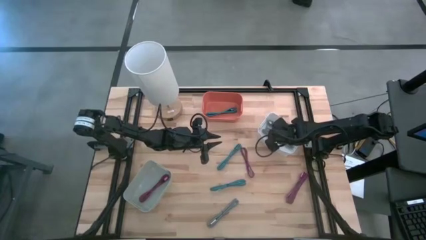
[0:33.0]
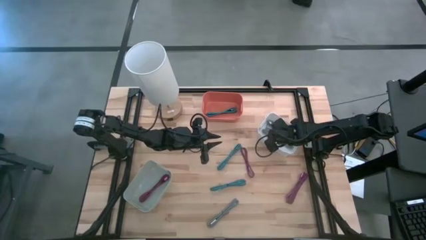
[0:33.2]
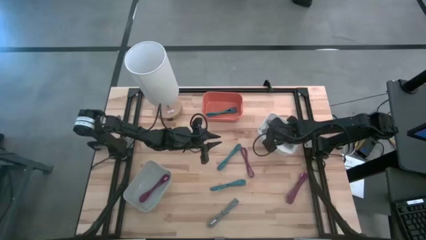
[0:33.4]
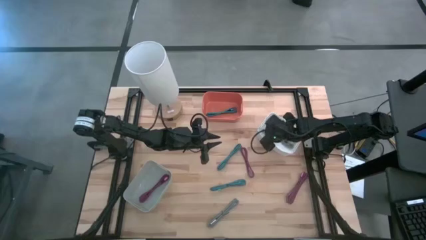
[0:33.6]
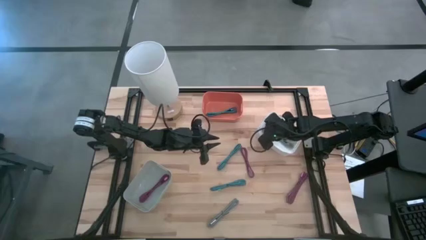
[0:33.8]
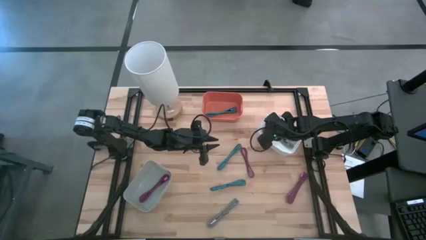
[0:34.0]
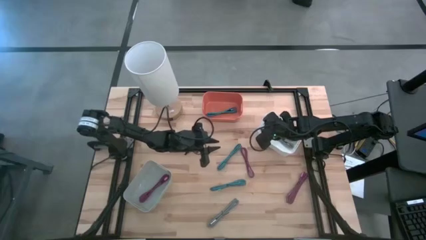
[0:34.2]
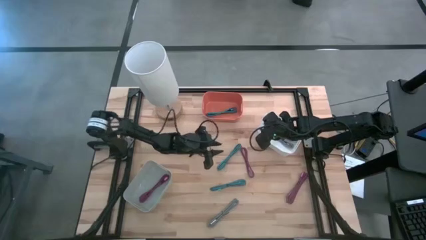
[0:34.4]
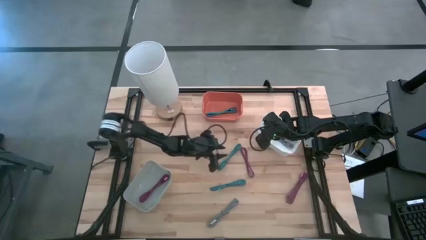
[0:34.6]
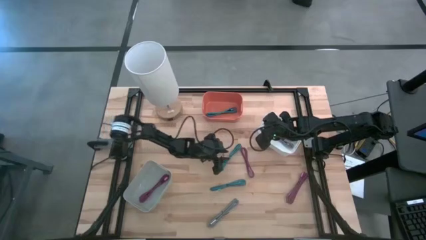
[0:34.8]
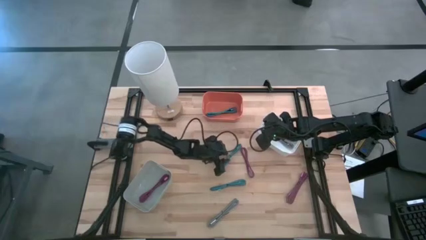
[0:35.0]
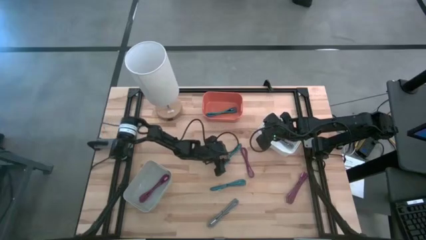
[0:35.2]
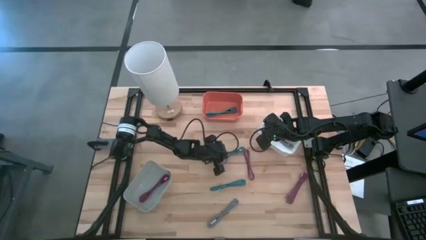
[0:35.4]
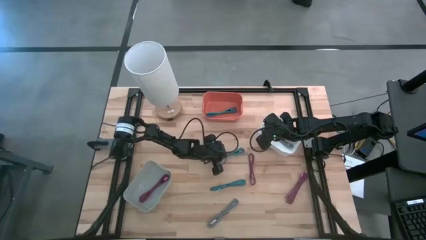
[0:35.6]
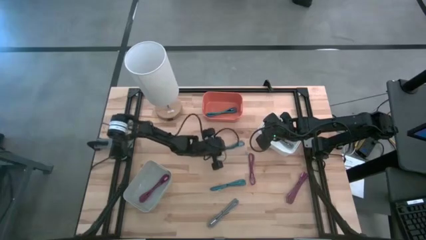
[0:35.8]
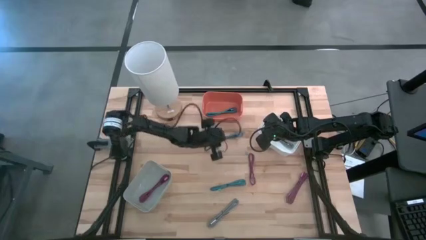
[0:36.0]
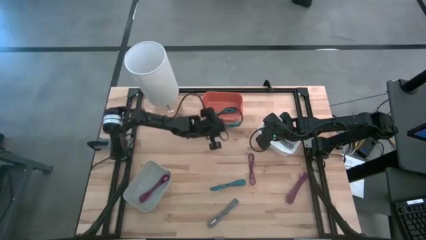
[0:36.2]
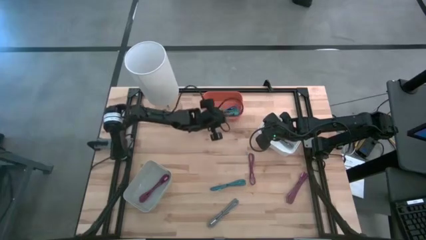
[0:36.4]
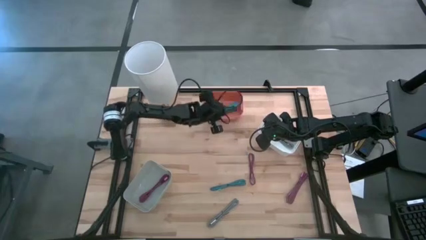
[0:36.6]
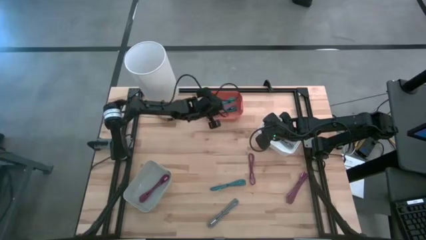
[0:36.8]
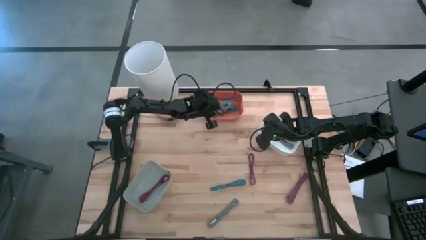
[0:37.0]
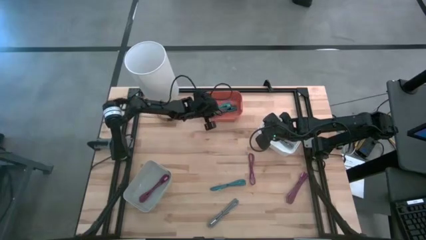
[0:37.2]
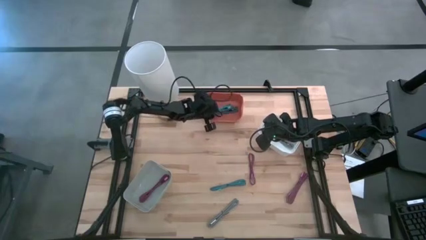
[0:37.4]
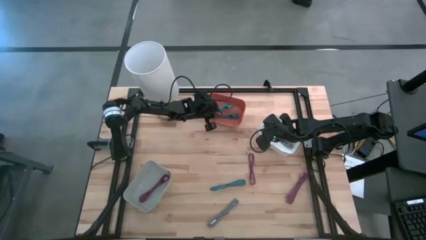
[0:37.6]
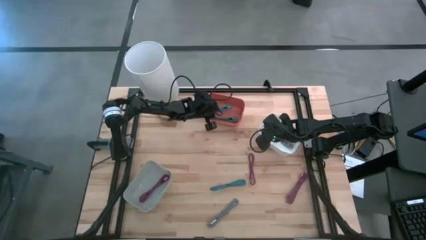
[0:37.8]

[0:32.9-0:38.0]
Task: Pick & Place USB Port
Put the top blue and white charger cable into the orange bin

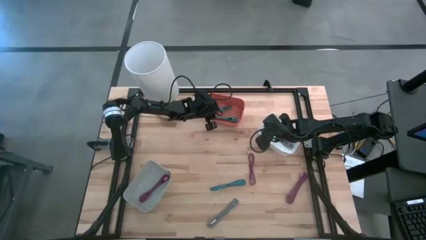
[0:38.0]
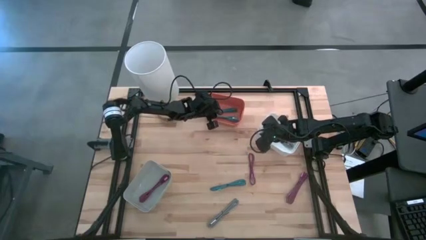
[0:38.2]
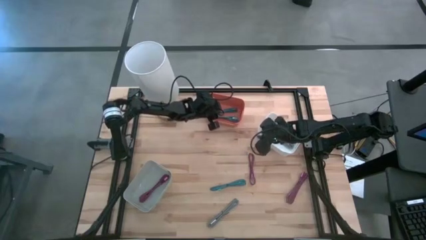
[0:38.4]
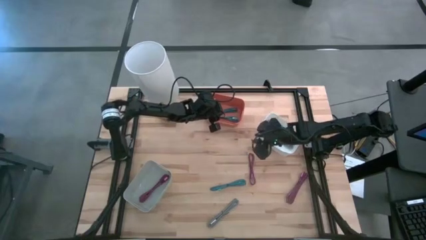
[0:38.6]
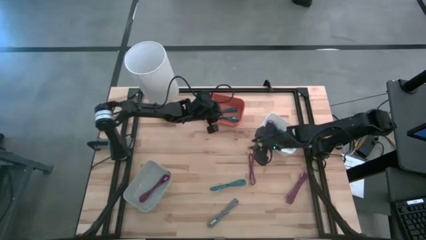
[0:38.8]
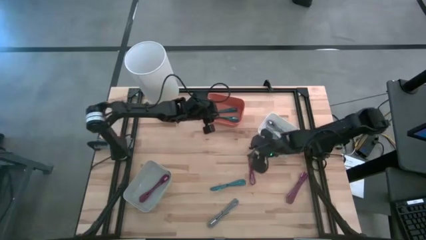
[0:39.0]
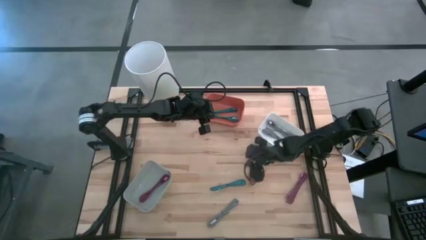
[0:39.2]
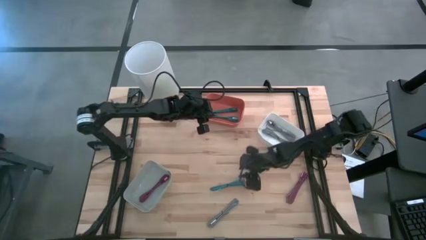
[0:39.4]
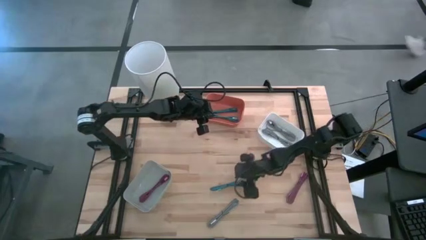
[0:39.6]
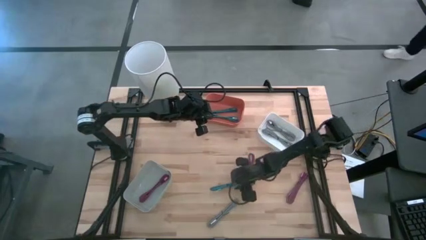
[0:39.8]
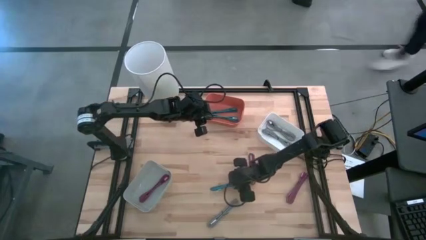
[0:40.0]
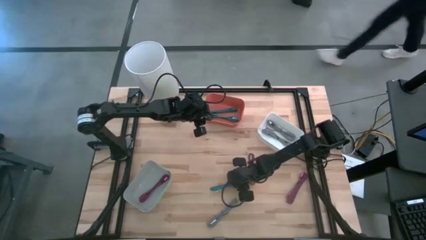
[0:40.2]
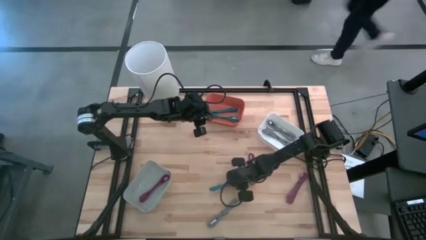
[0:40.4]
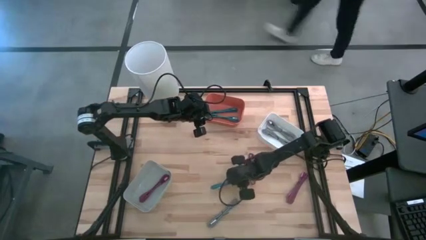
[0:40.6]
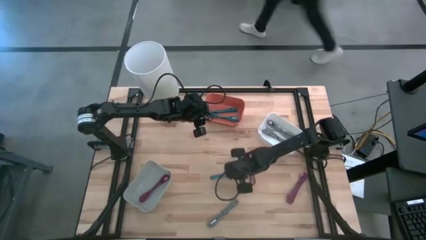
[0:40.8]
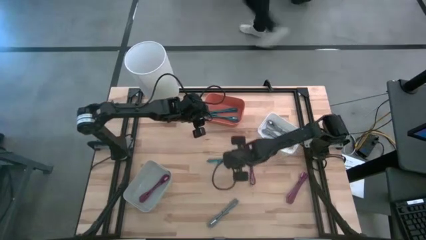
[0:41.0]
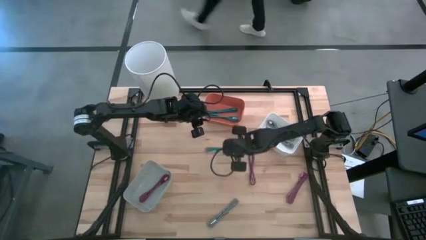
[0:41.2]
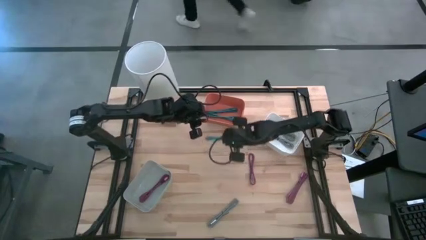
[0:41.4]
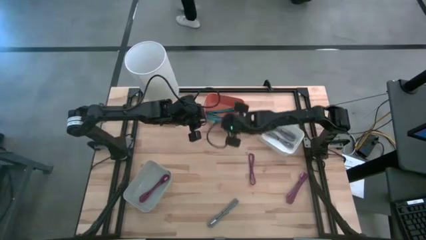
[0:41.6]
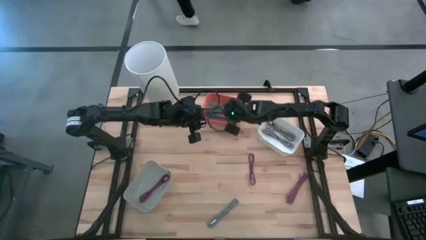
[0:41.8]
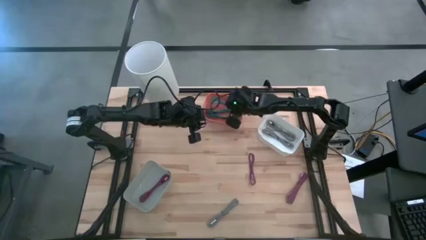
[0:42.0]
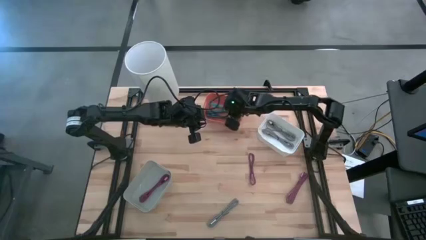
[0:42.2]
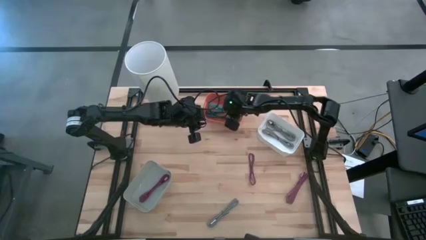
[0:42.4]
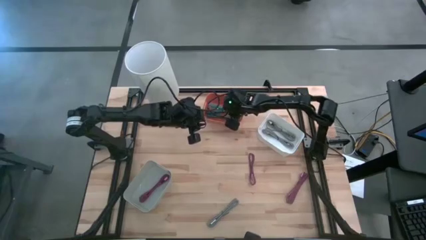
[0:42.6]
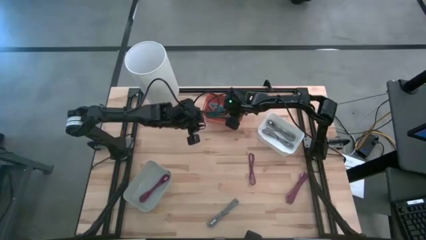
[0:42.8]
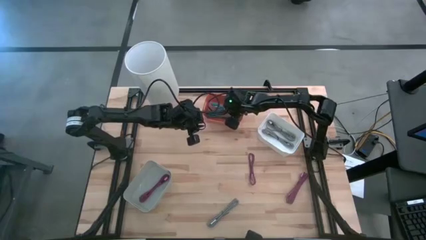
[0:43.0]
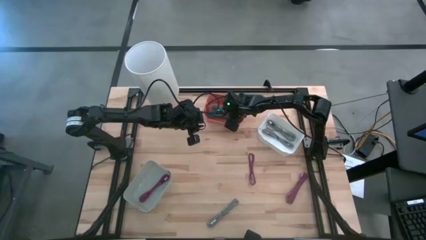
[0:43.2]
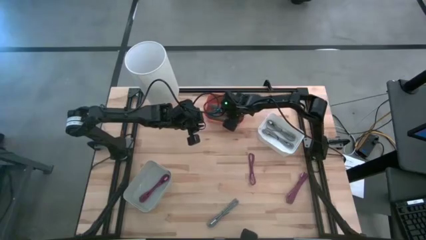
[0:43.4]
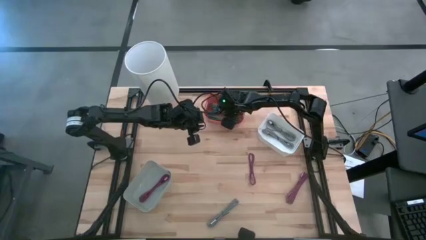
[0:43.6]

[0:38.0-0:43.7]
Put the blue and white charger cable into the orange bin

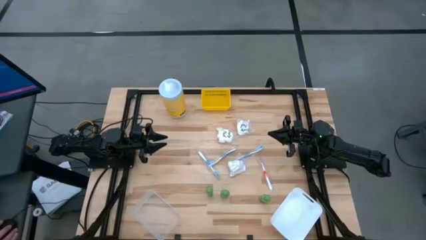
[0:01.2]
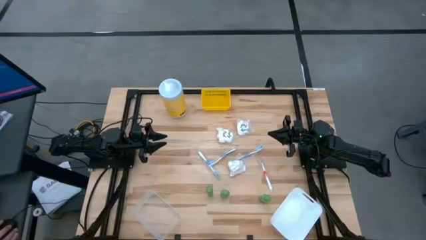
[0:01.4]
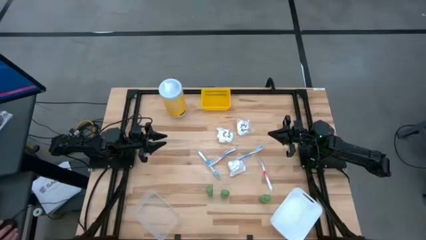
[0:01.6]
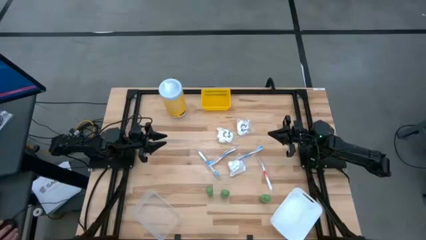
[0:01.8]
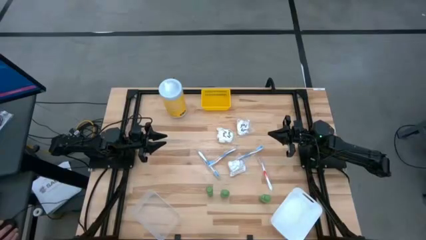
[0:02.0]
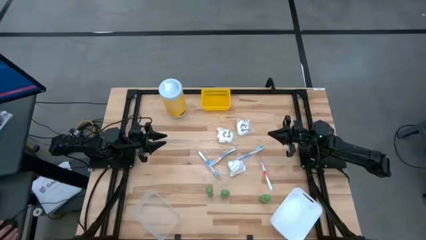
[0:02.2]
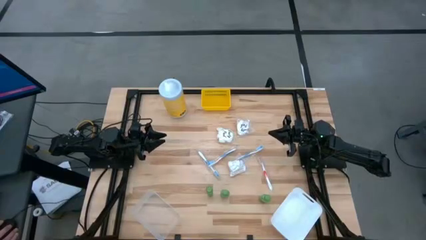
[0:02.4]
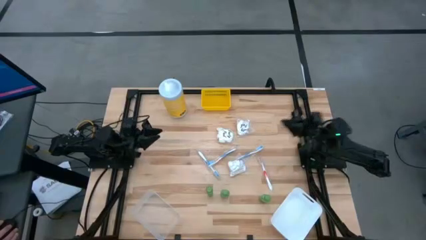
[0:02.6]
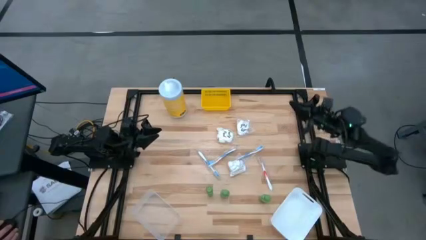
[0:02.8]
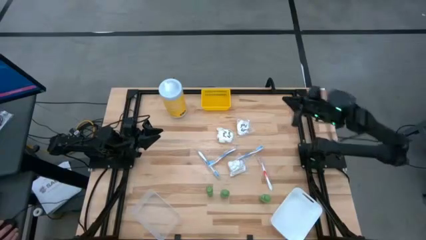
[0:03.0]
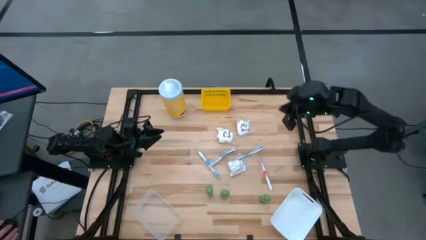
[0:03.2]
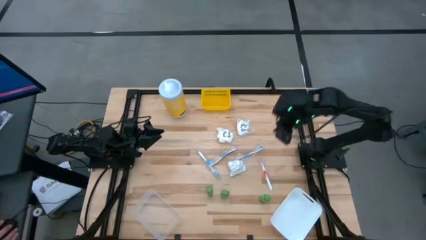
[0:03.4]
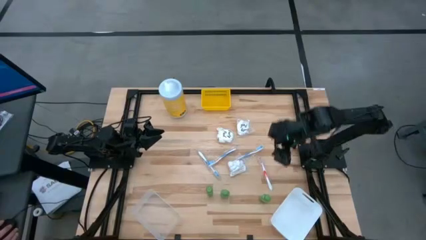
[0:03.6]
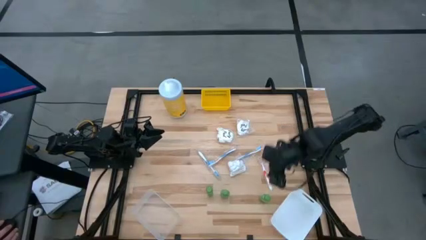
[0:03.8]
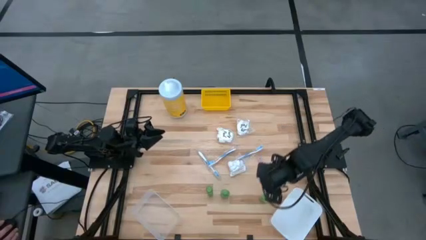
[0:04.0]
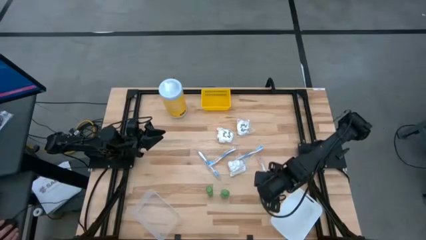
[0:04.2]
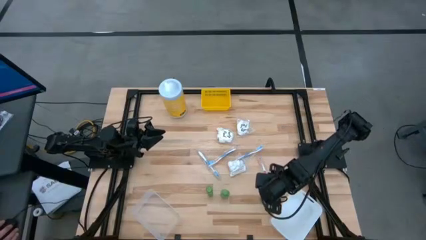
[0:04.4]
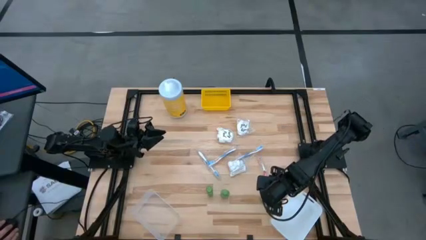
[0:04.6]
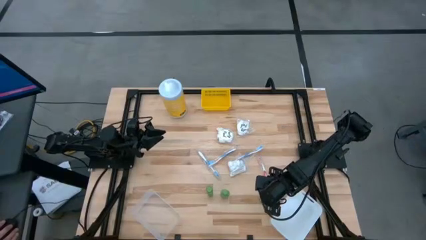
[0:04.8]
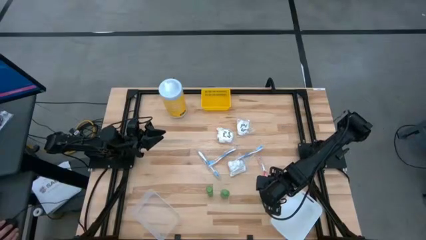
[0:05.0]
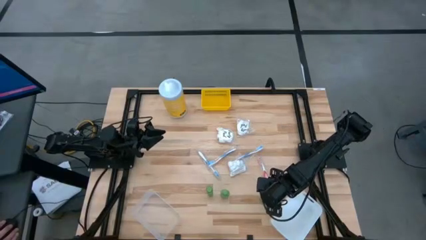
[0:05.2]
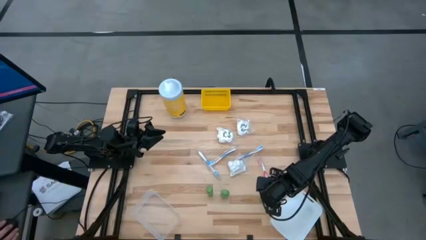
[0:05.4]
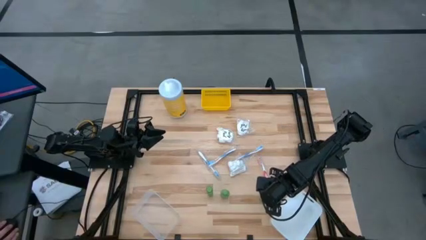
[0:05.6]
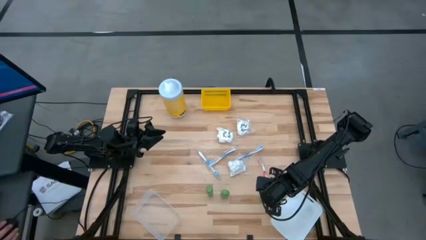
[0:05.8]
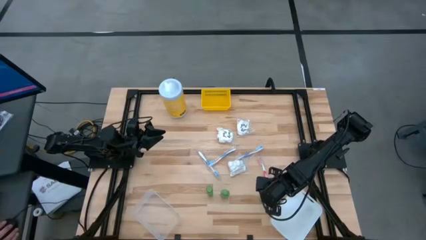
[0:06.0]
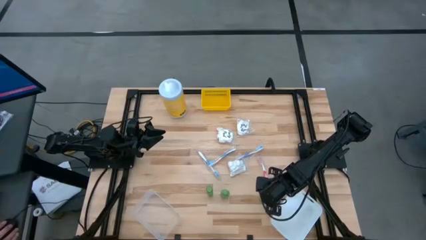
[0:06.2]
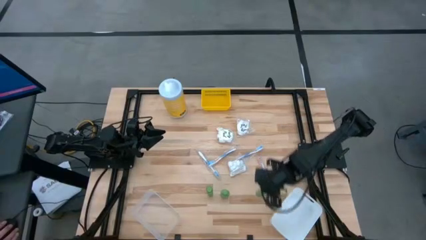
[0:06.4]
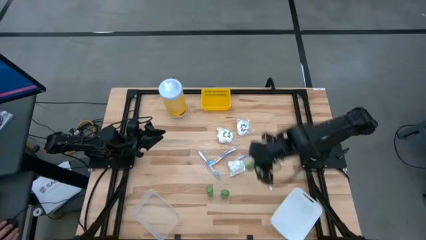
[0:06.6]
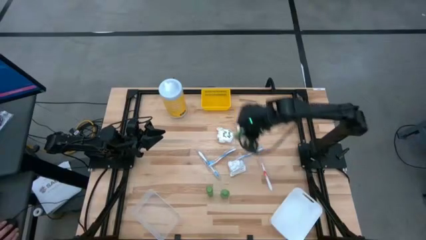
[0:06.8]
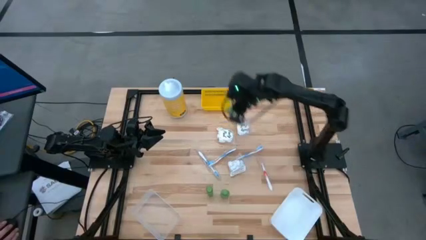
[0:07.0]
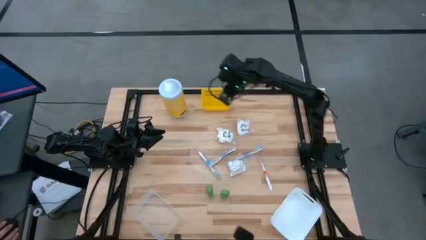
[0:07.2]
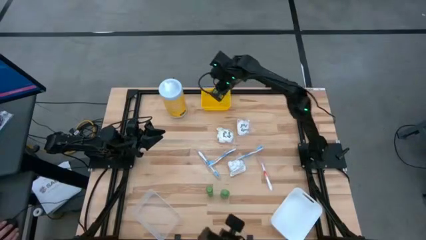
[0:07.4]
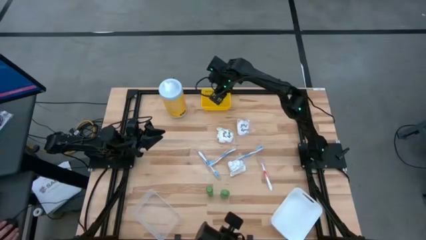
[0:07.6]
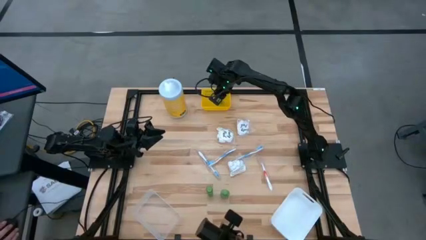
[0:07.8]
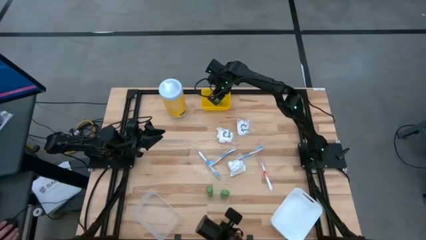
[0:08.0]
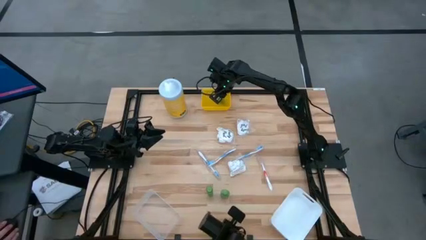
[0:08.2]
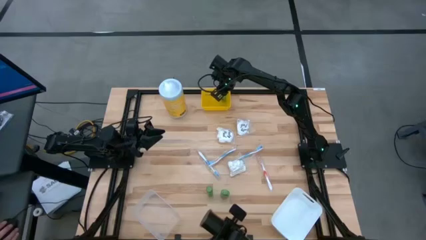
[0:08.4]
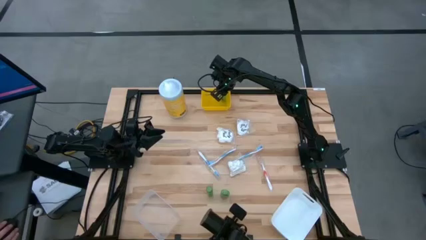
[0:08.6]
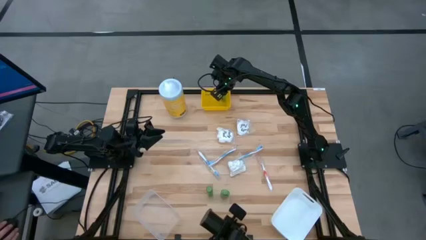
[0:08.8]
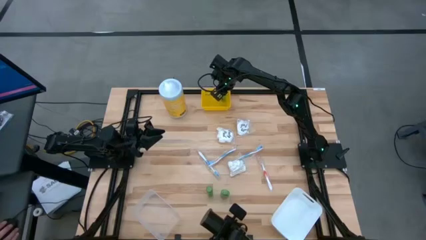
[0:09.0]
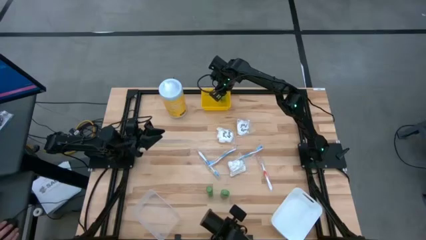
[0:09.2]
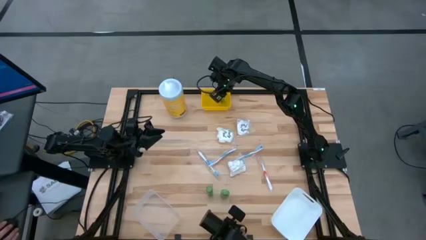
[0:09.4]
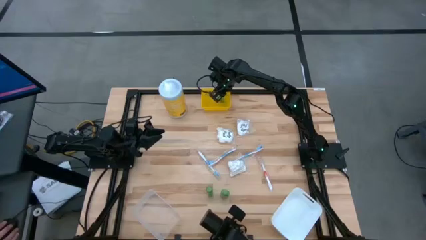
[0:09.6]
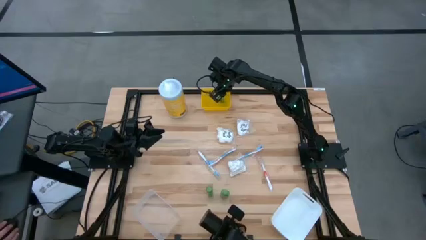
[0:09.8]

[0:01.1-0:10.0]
Task: Pick & Place Travel size toiletries
Put the right green shampoo into the yellow bin
